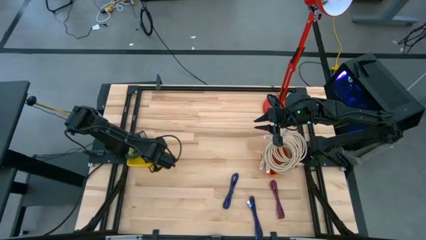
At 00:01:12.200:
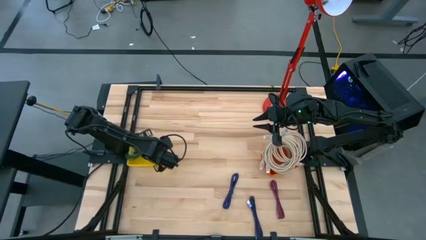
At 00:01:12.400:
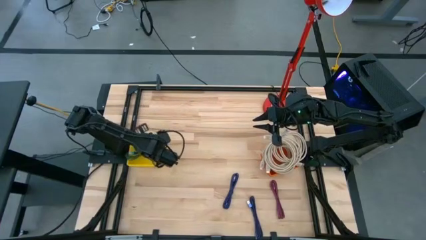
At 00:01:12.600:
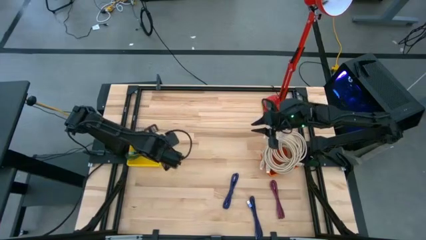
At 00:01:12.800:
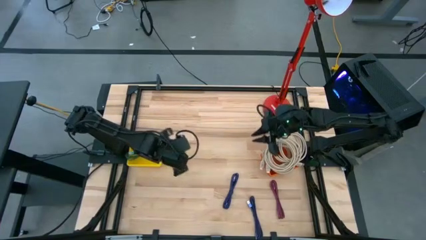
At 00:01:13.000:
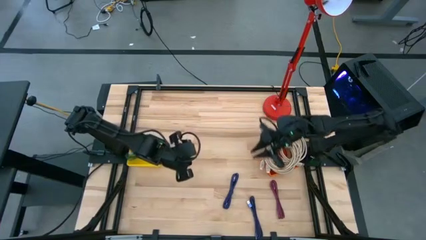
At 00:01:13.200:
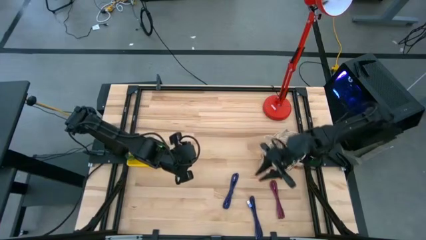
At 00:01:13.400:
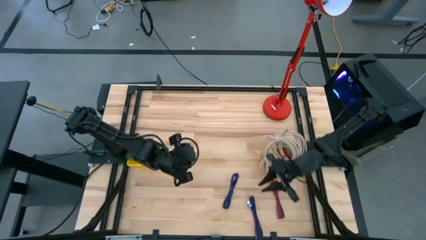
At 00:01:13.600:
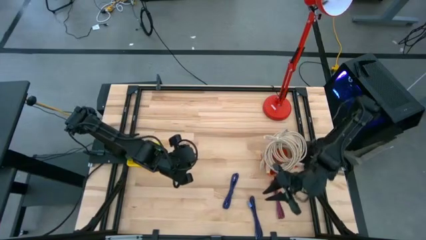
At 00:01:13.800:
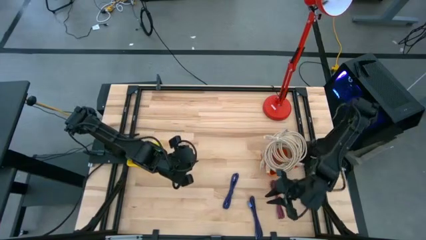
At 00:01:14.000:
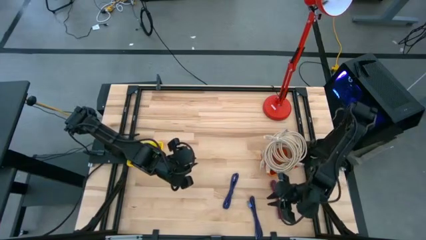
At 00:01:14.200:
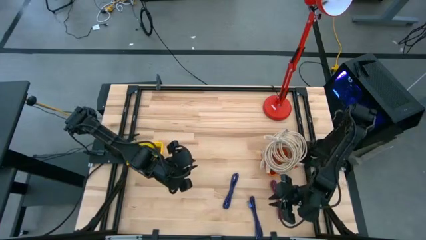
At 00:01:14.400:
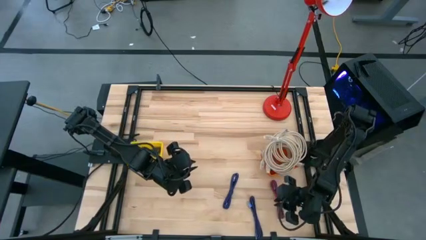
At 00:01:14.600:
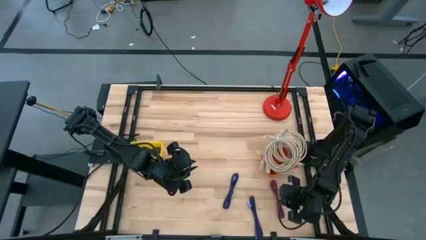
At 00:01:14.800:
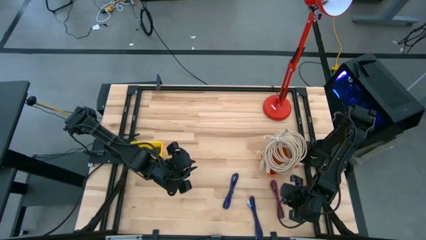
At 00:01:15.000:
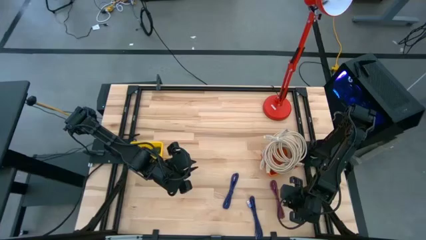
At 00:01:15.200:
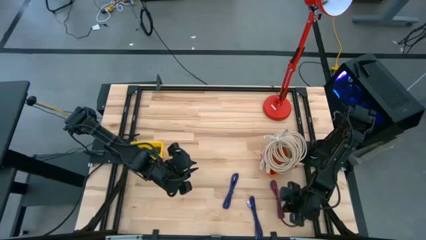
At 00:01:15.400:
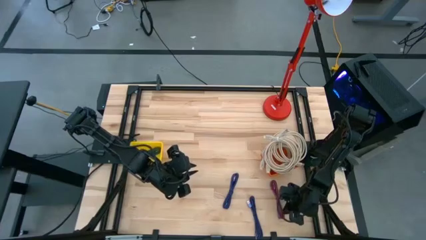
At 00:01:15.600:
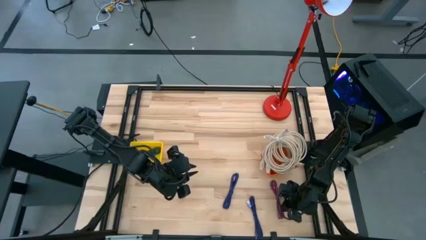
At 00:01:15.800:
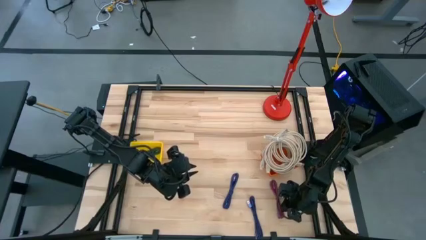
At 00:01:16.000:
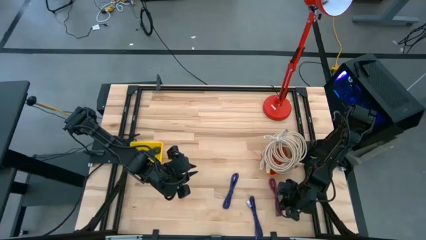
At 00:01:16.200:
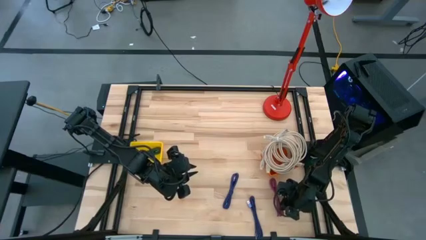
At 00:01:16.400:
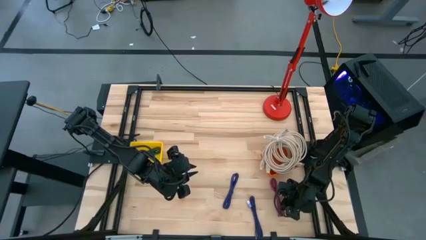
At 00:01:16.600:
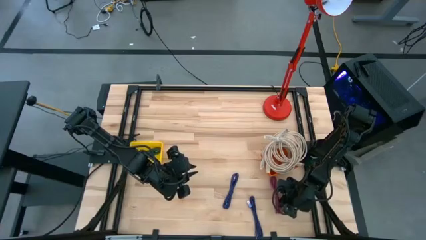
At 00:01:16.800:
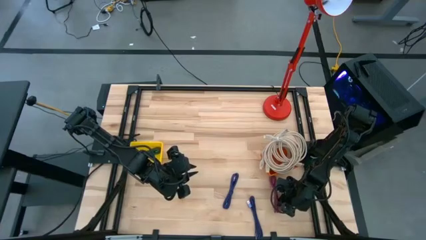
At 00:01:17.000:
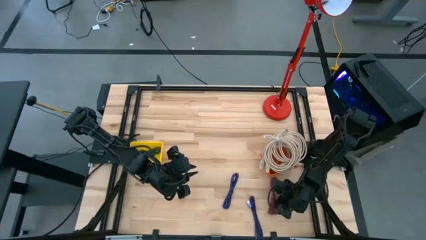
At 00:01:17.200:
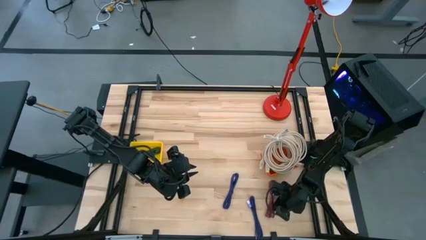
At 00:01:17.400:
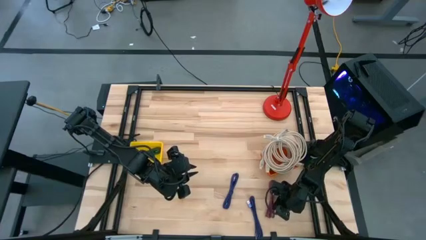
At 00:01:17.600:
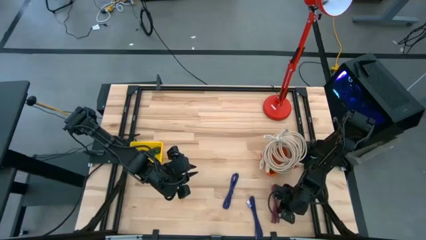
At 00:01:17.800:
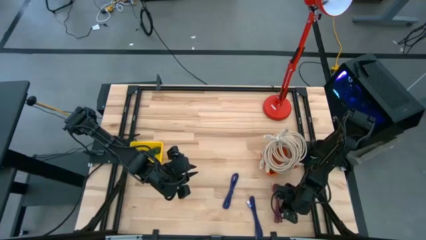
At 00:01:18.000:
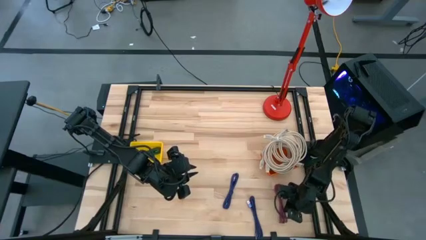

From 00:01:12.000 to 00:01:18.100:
Task: Pick & Place USB Port
Put the black and pink charger cable into the yellow bin

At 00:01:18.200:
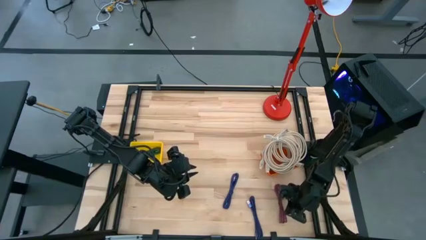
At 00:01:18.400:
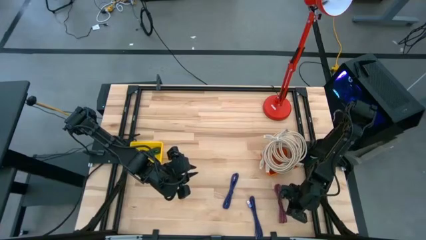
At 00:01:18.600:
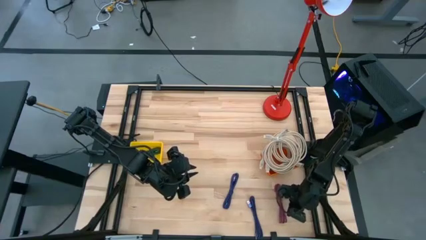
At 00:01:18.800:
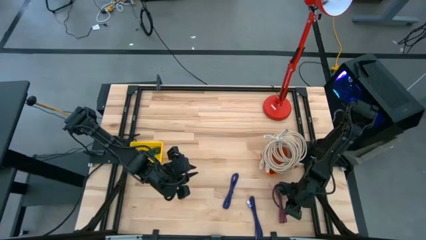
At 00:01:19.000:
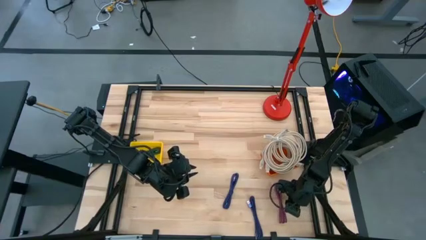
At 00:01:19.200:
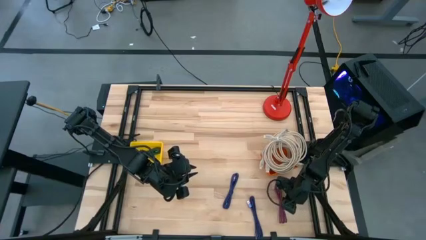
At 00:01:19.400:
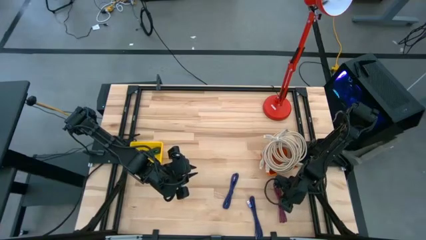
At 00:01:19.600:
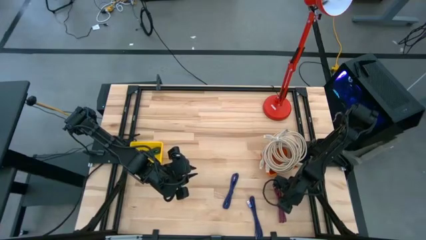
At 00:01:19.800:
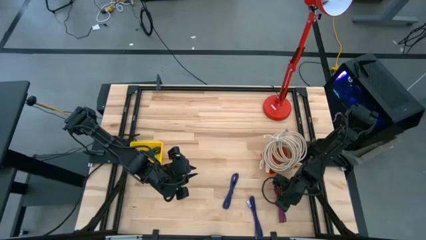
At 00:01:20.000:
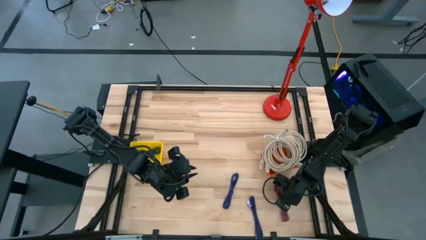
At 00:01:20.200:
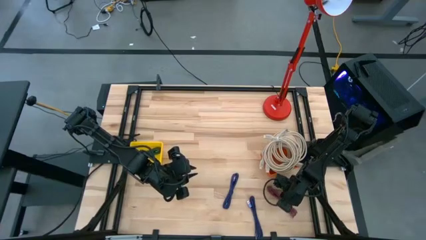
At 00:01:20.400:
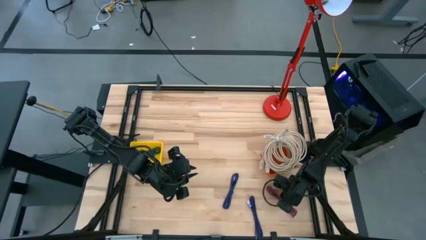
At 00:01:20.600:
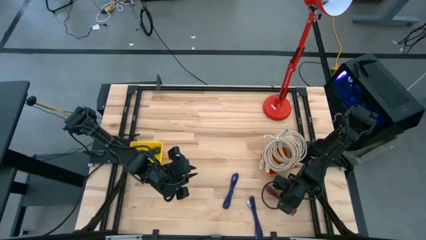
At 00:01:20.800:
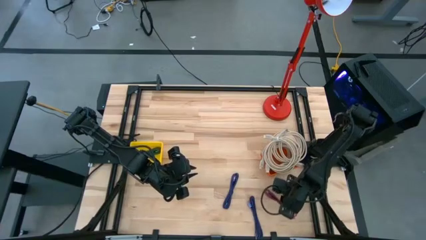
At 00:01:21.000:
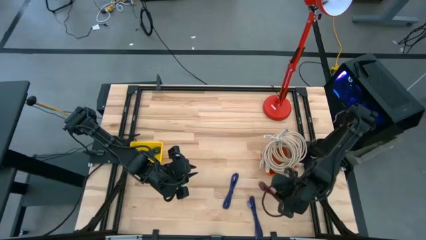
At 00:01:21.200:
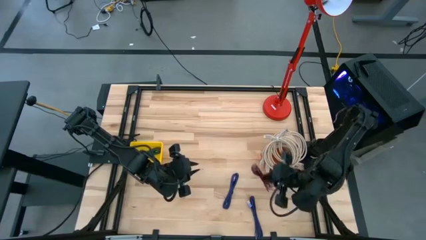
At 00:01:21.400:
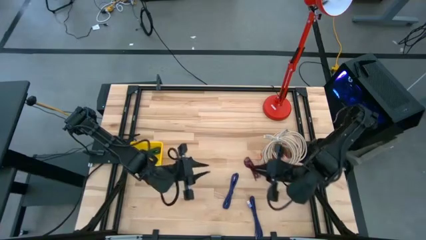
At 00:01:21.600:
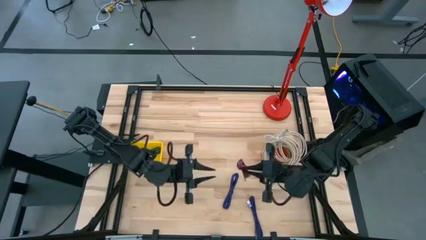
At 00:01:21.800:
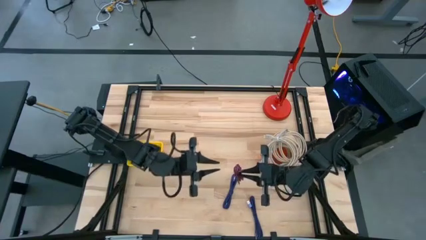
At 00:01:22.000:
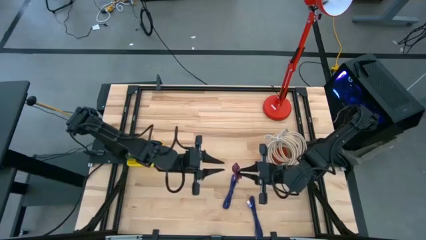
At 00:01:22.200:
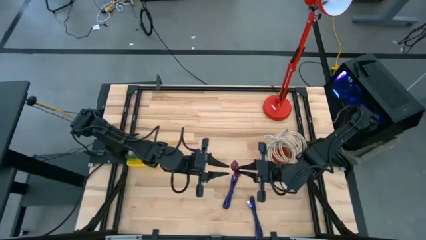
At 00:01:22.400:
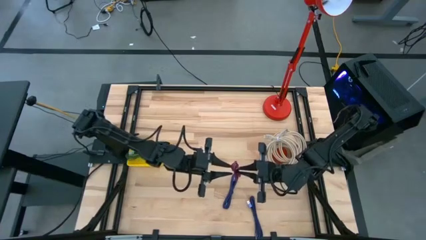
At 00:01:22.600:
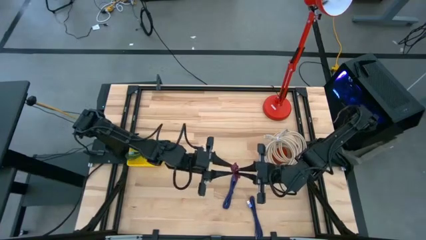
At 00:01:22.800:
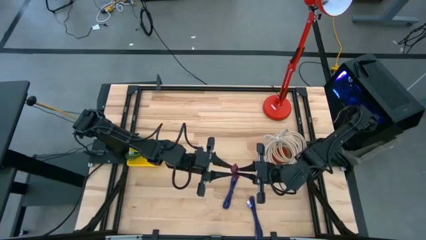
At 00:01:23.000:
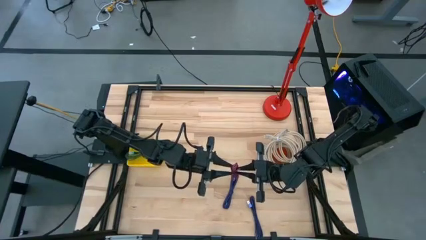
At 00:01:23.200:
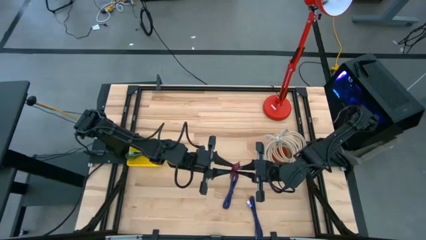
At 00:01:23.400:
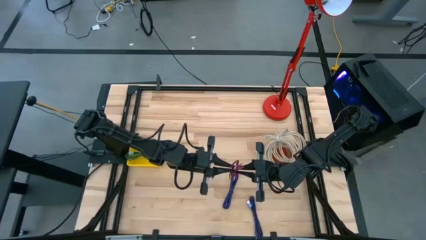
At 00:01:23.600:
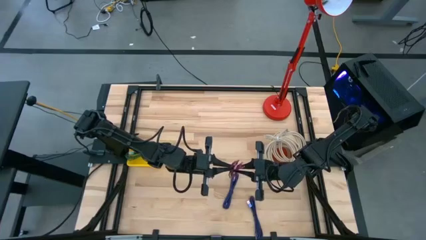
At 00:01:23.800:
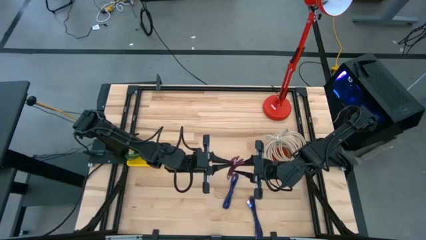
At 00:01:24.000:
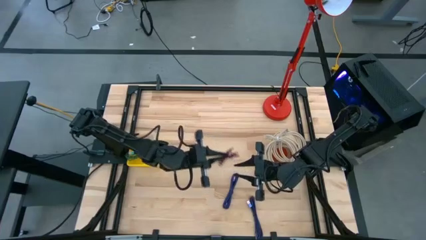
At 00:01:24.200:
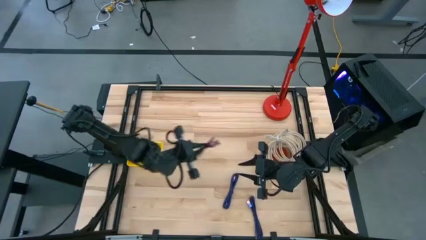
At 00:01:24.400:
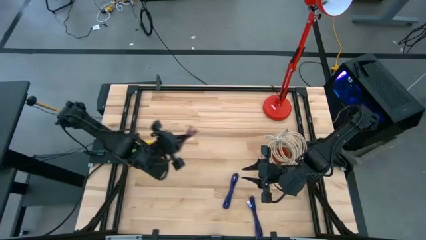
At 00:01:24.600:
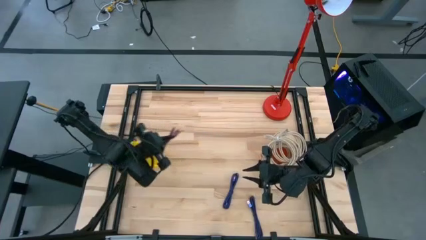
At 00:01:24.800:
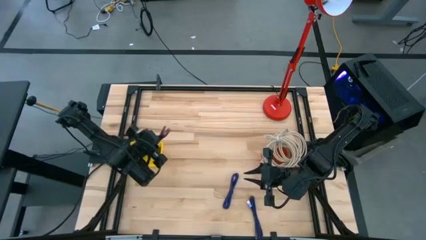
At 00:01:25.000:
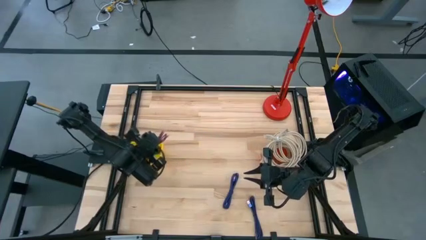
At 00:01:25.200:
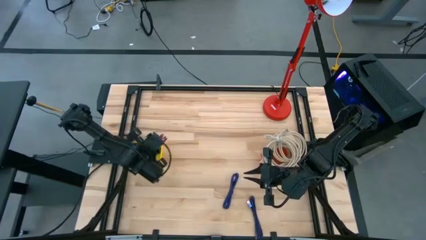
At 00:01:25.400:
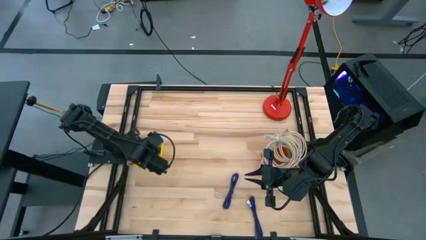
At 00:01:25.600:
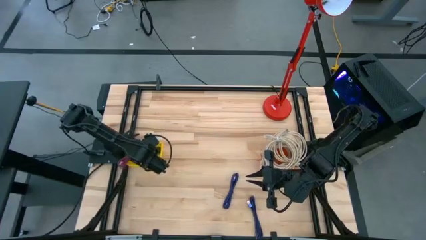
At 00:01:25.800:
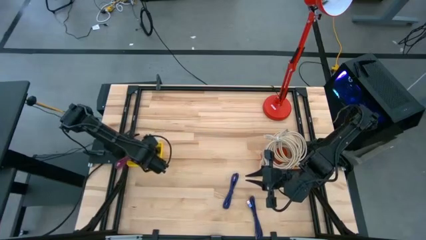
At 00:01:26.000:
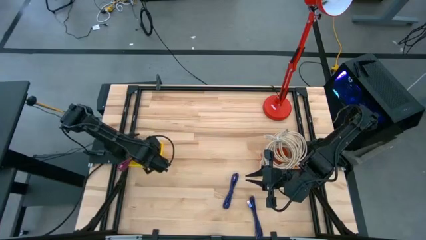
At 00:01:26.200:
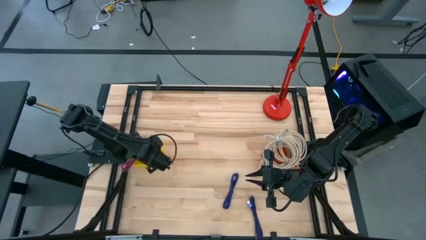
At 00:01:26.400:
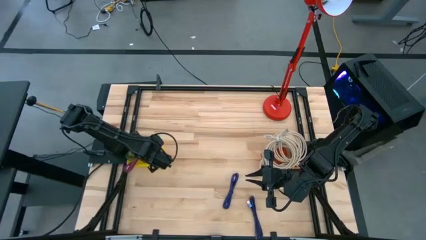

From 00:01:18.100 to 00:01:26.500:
Put the black and pink charger cable into the yellow bin

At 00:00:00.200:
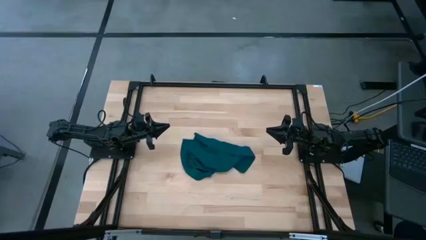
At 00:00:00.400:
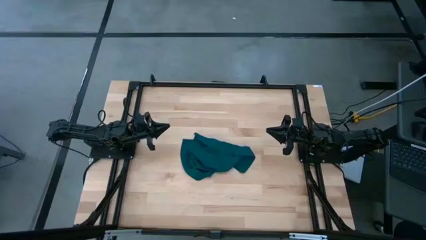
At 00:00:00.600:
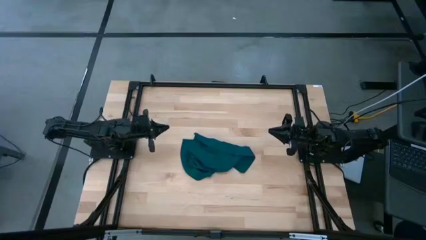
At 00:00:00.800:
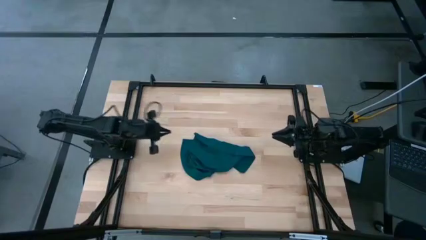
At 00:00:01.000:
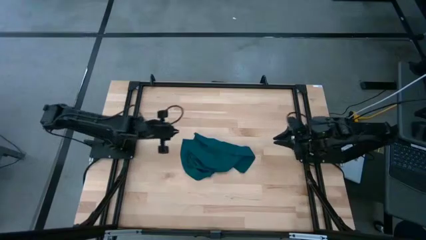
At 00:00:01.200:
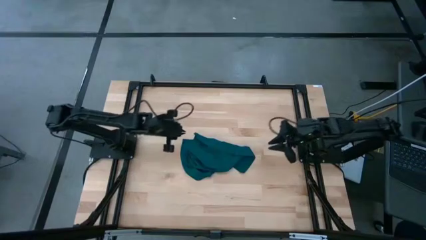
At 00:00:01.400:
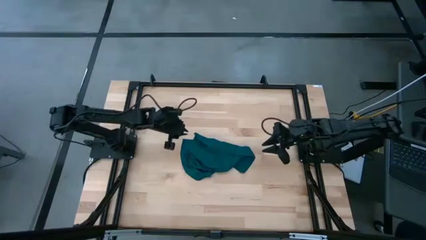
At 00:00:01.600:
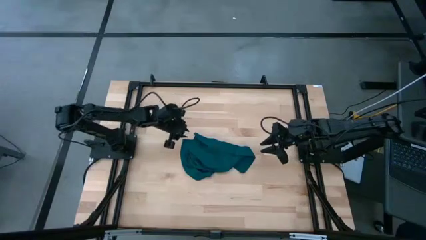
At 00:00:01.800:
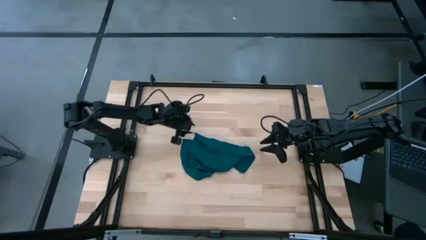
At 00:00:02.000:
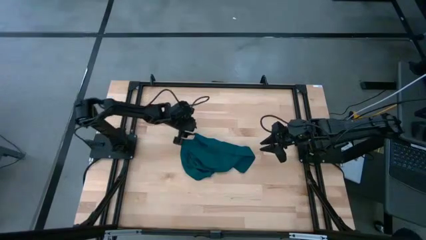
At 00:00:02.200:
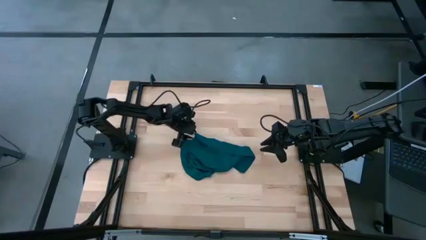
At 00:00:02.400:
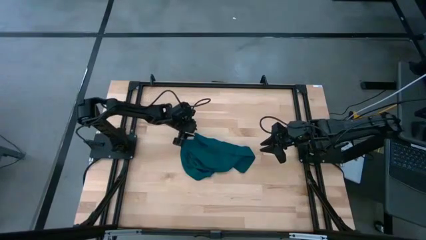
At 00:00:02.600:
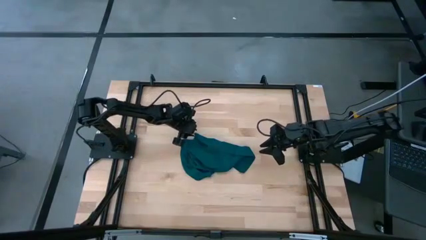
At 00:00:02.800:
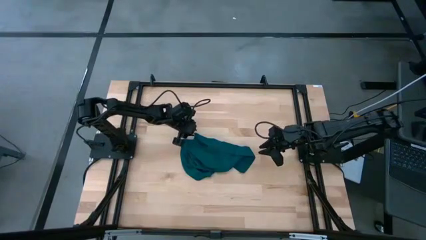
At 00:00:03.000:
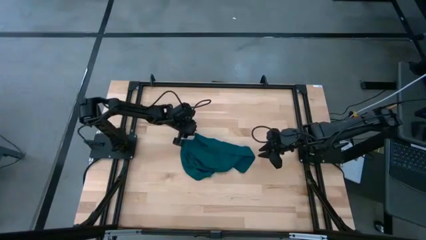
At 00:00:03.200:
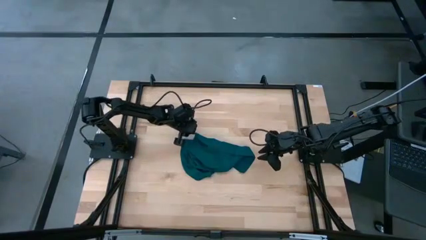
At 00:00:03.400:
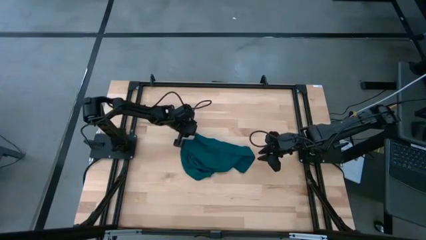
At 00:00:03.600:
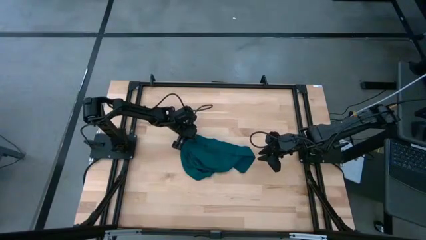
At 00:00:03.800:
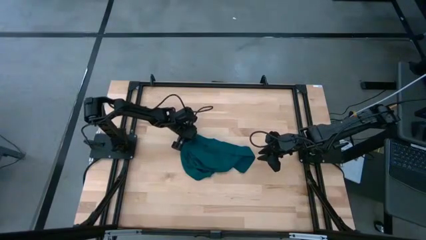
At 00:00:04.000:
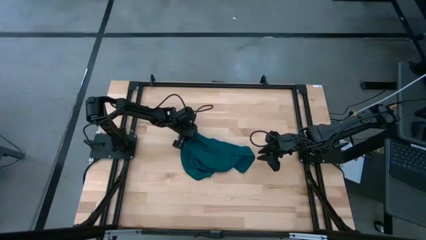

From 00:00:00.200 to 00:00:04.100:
Task: Fold microfiber towels
Fold the green napkin
